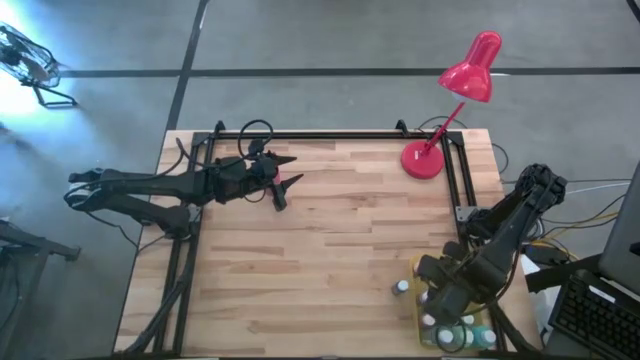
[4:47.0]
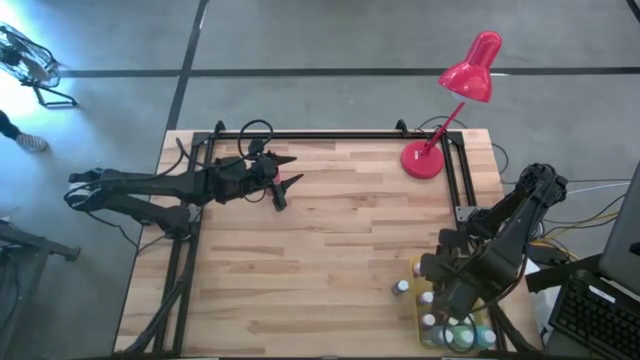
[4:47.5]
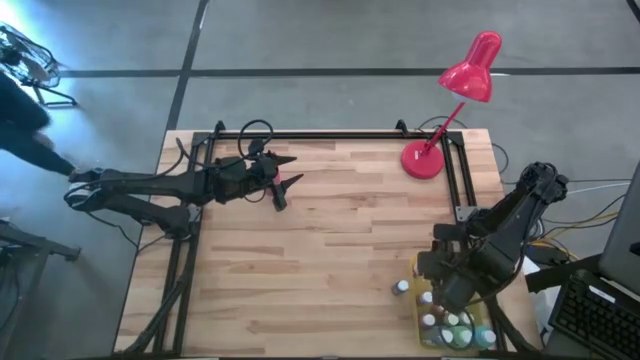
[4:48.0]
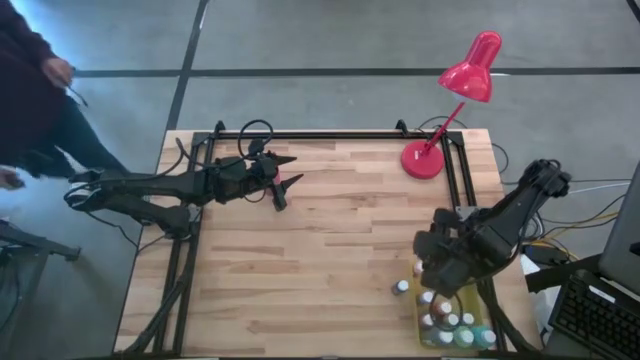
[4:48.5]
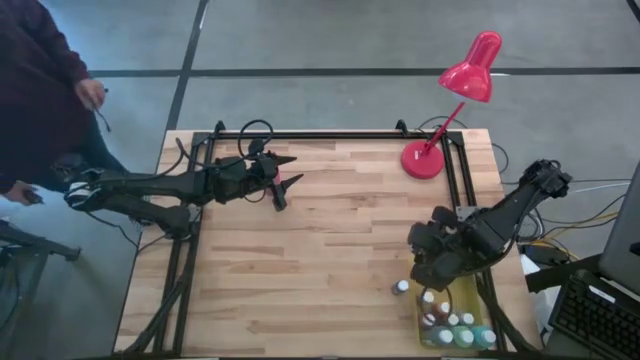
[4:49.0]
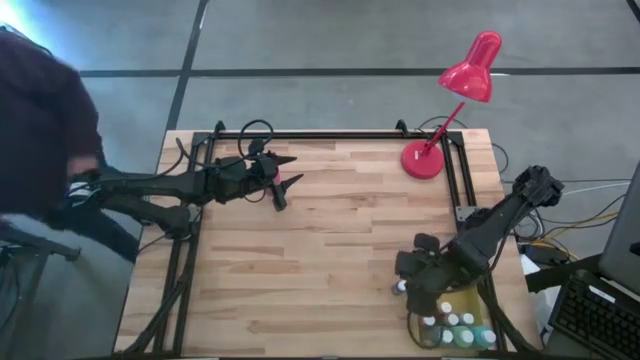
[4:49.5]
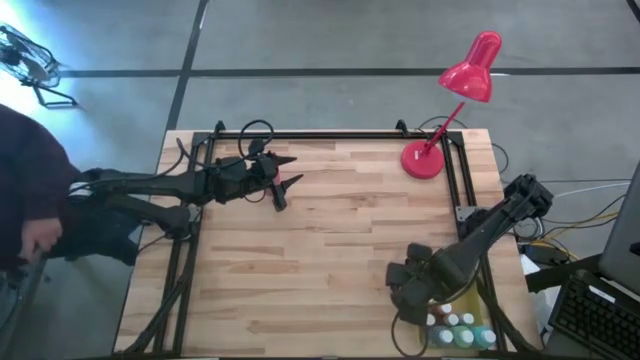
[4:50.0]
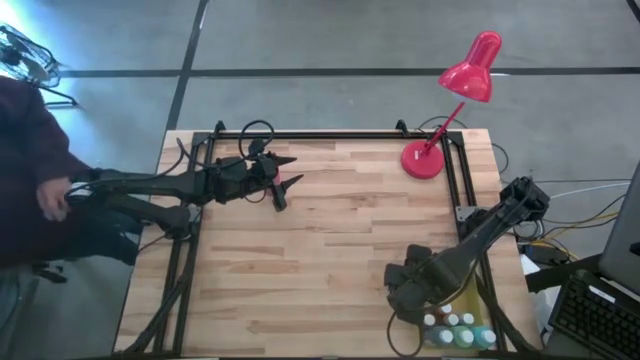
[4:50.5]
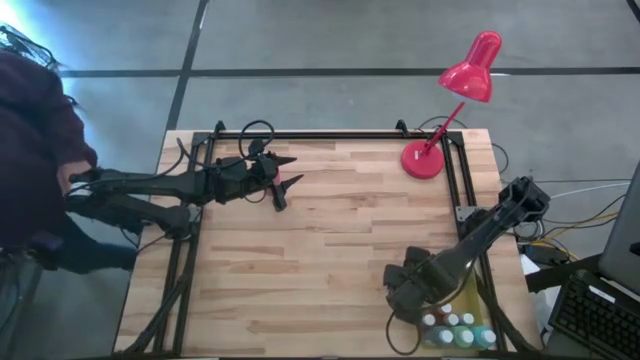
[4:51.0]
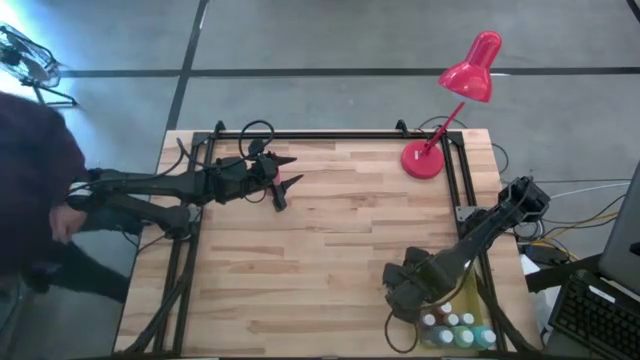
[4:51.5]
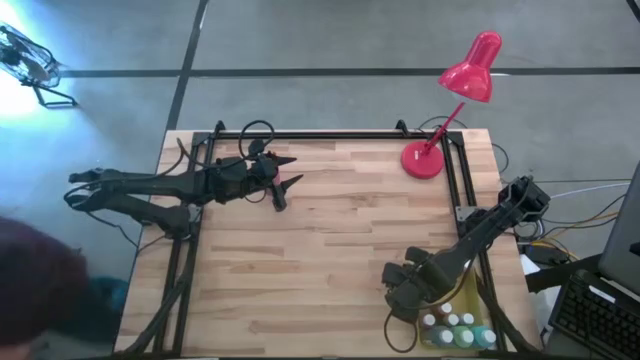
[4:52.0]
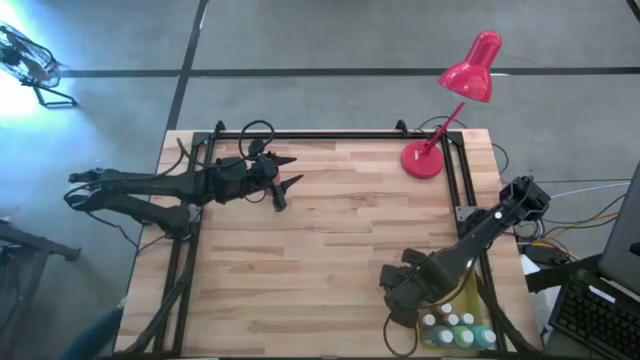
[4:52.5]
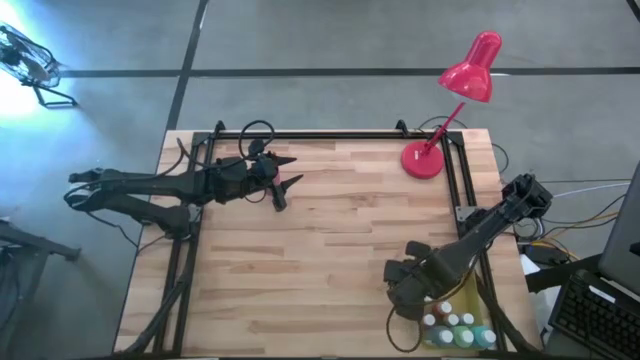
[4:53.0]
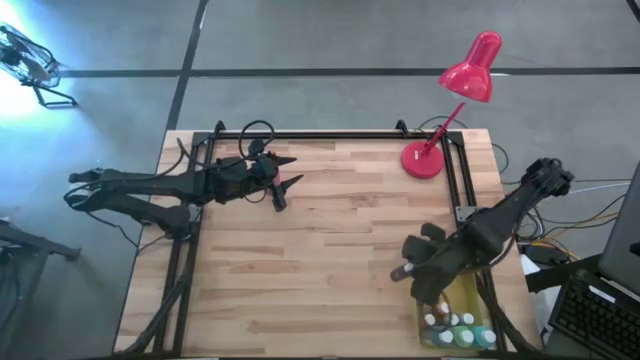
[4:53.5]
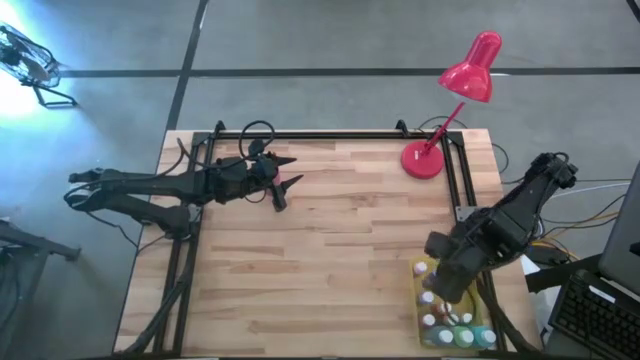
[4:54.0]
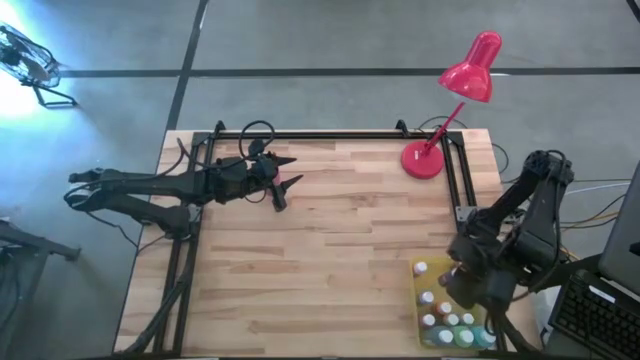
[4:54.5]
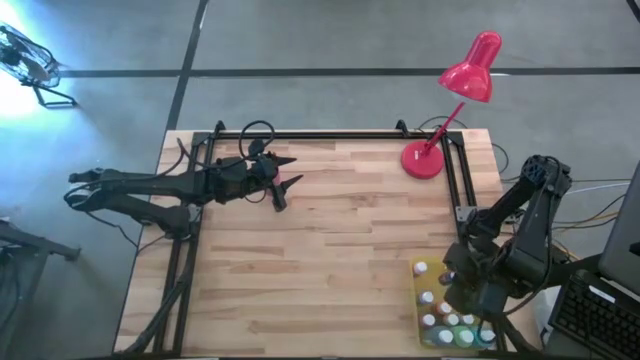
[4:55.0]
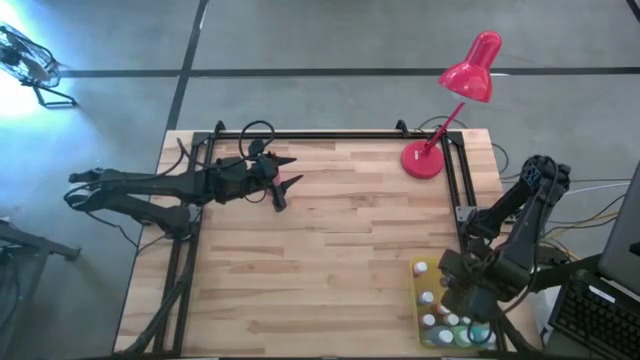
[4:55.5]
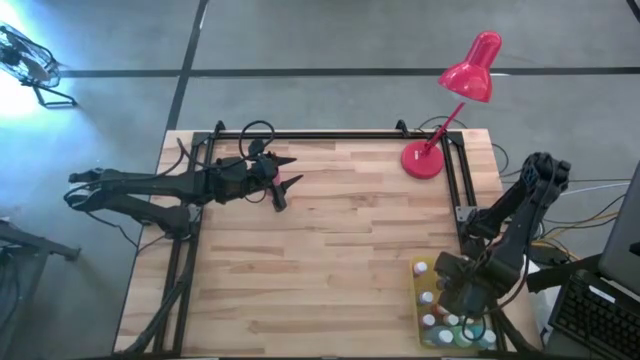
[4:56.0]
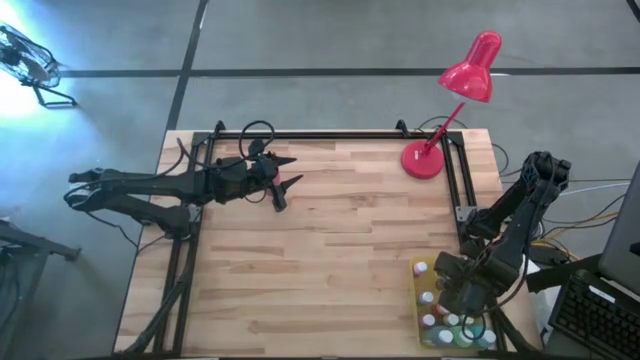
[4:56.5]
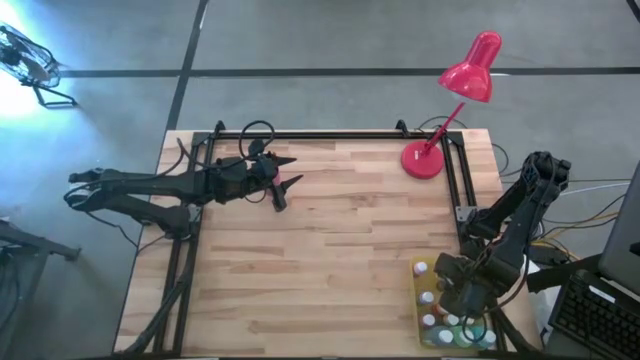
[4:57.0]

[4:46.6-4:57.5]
Task: Pick & Place Paint Supplies
Put the blue paint bottle into the yellow bin

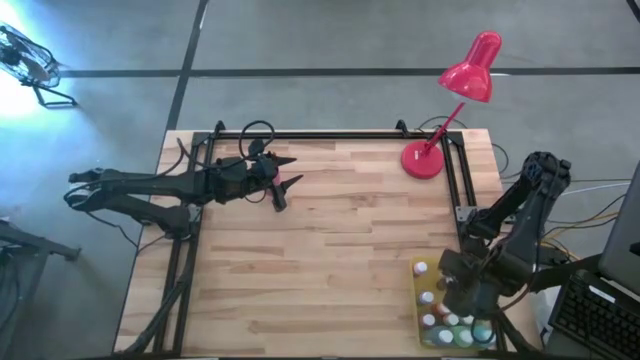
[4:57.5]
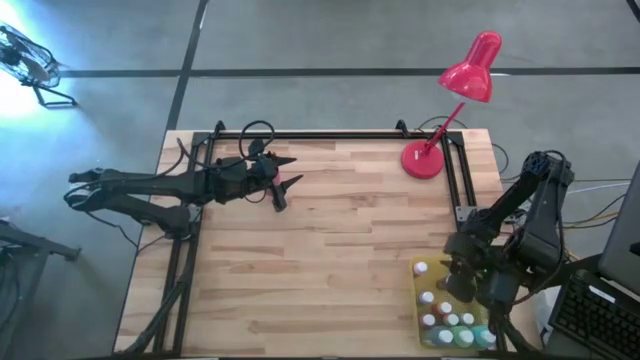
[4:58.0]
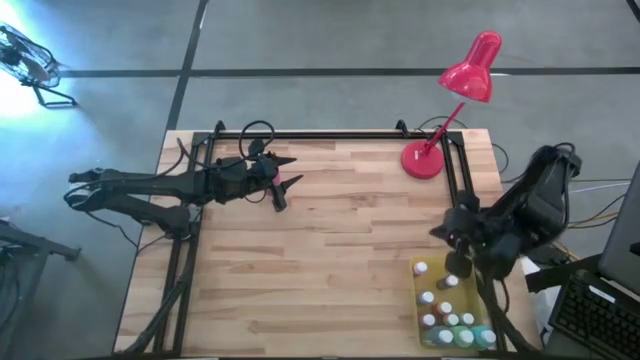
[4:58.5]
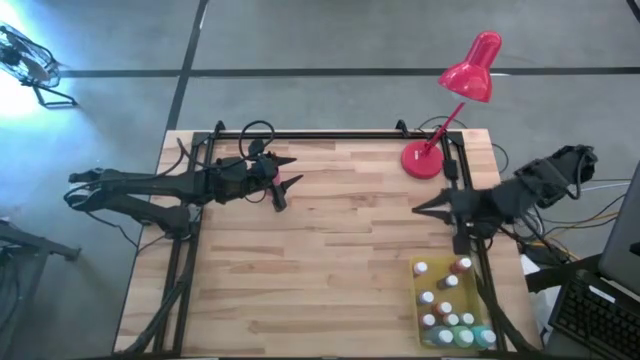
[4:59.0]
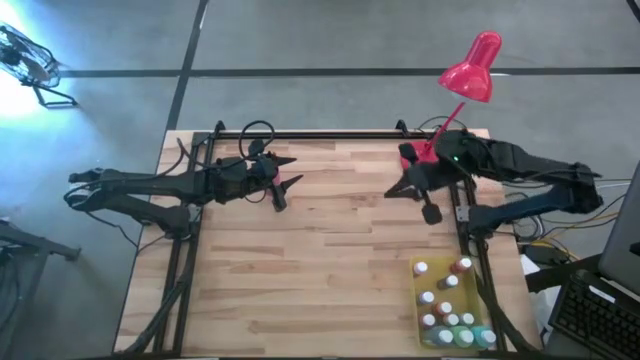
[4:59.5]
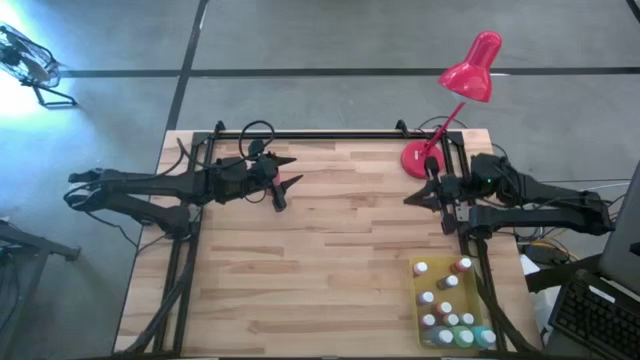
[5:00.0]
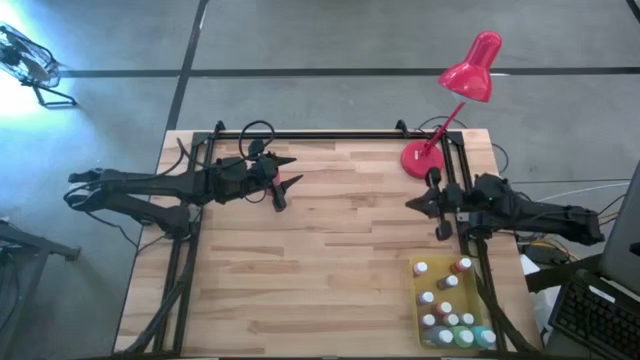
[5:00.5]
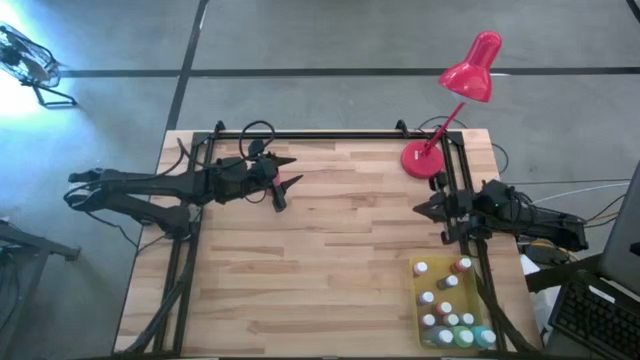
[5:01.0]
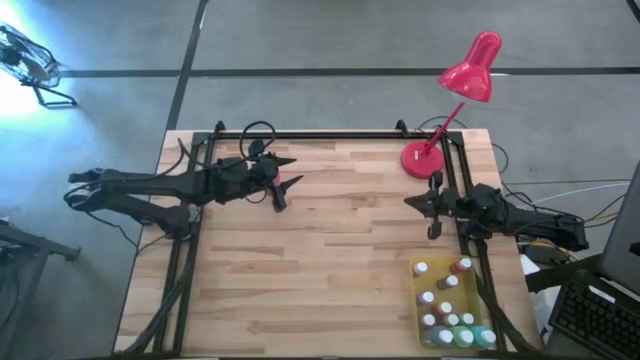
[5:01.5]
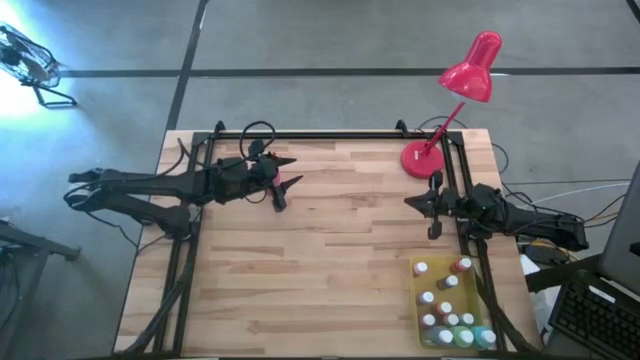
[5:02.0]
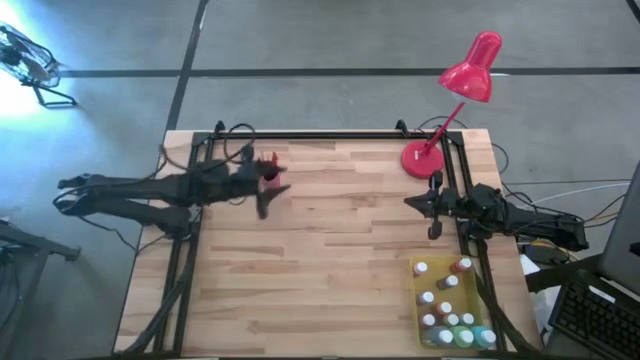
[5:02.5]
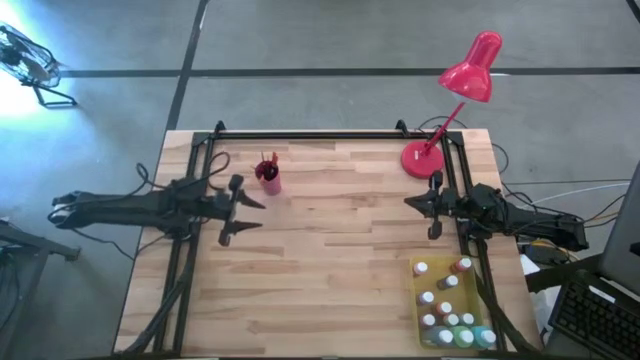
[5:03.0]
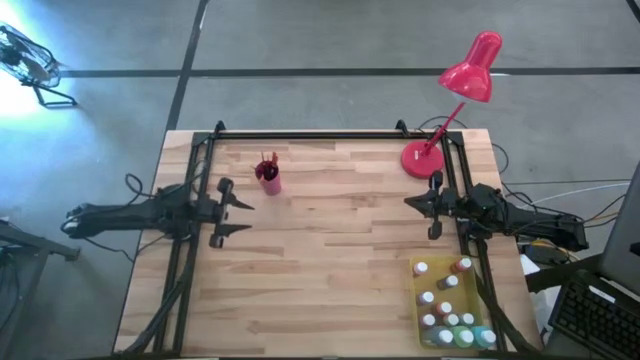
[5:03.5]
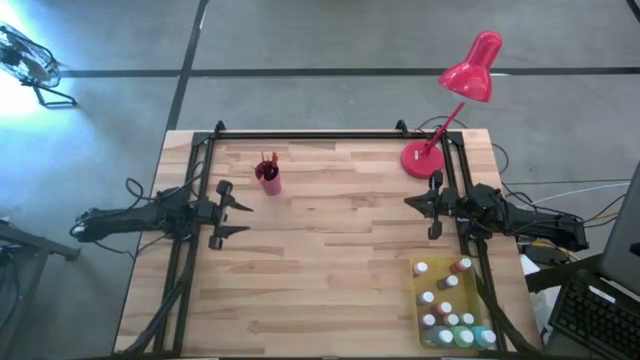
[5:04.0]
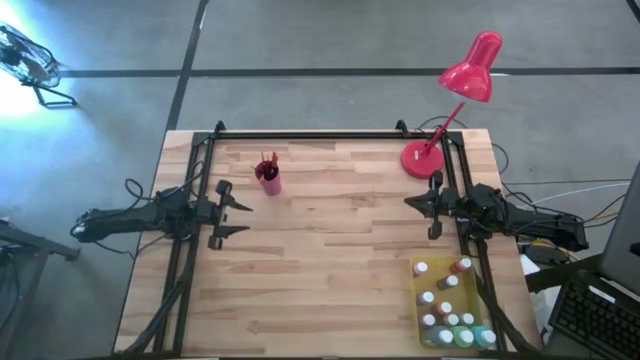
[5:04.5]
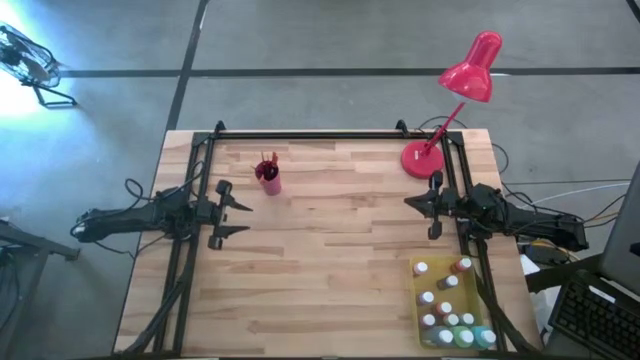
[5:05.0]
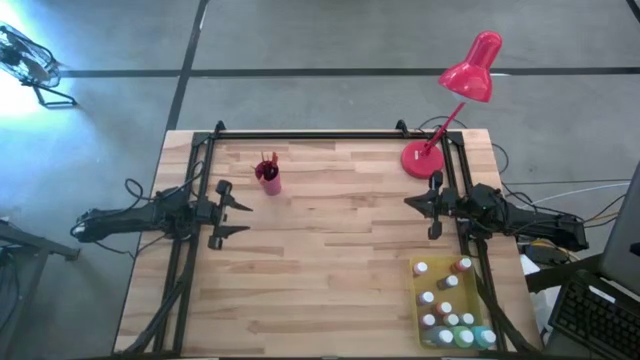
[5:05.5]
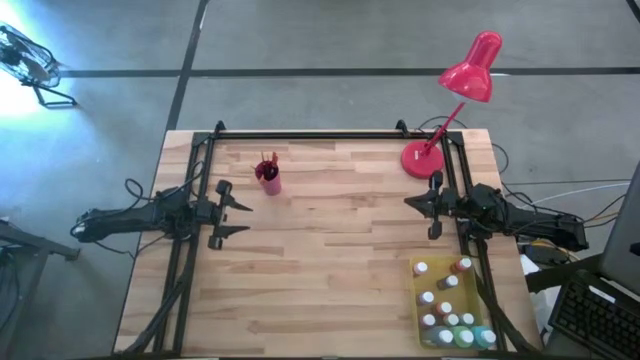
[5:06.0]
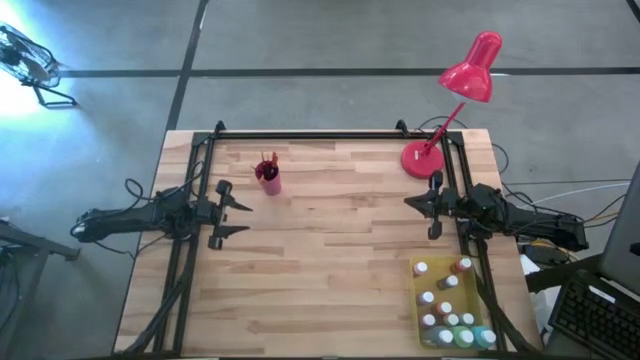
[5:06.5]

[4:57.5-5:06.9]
Return to Home Position
